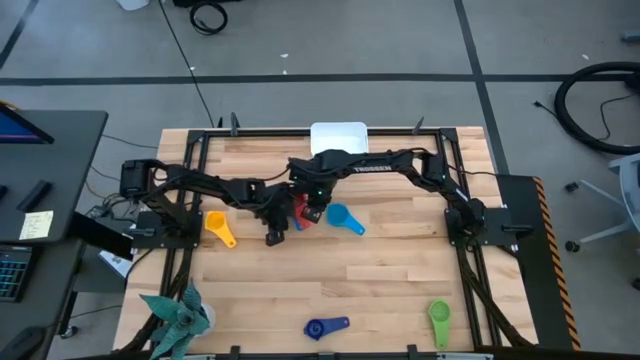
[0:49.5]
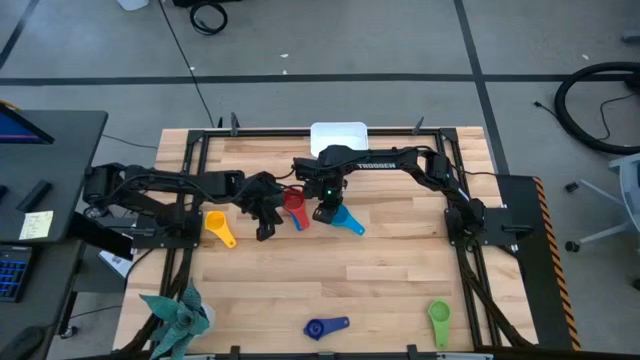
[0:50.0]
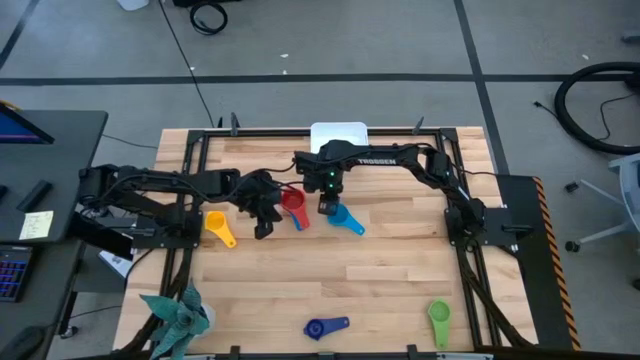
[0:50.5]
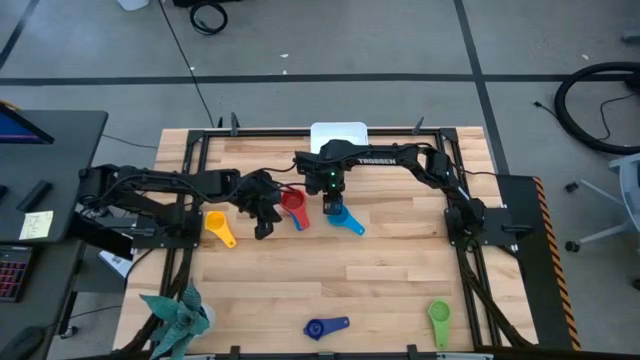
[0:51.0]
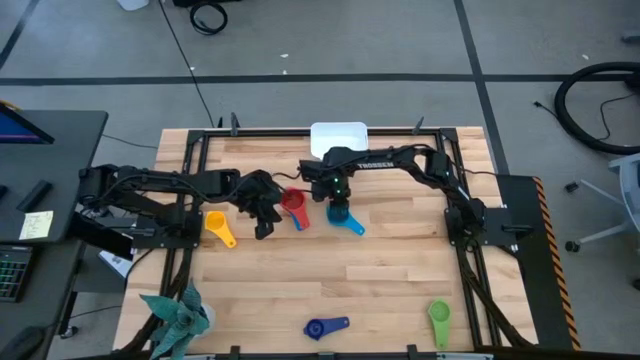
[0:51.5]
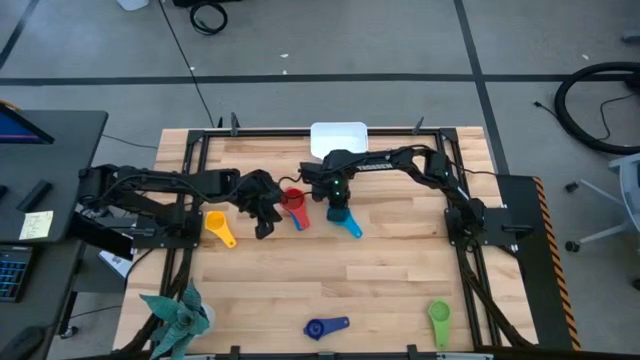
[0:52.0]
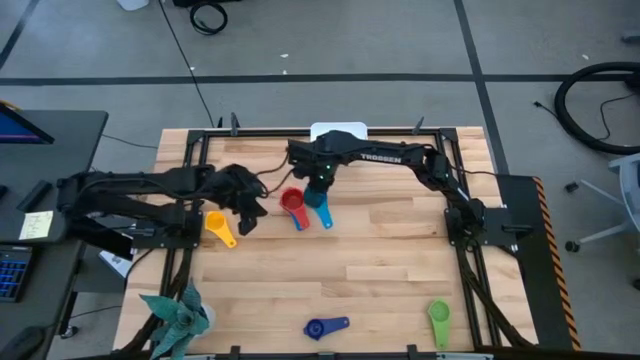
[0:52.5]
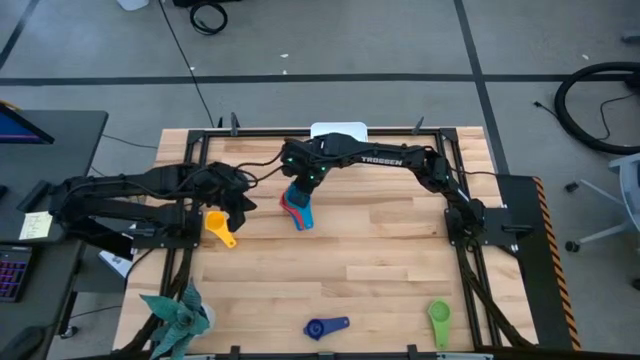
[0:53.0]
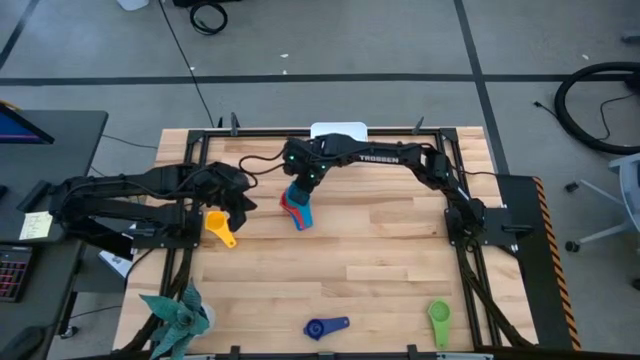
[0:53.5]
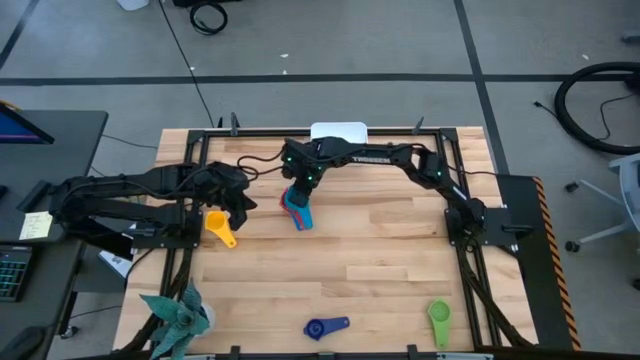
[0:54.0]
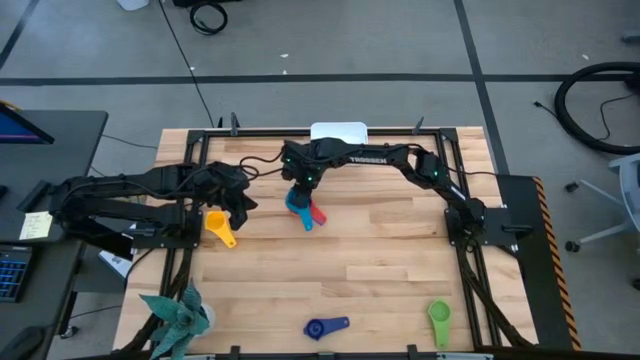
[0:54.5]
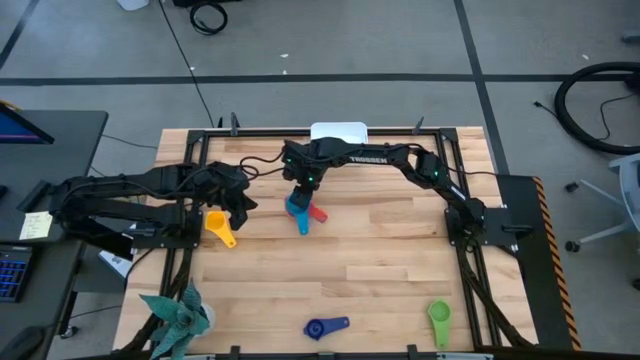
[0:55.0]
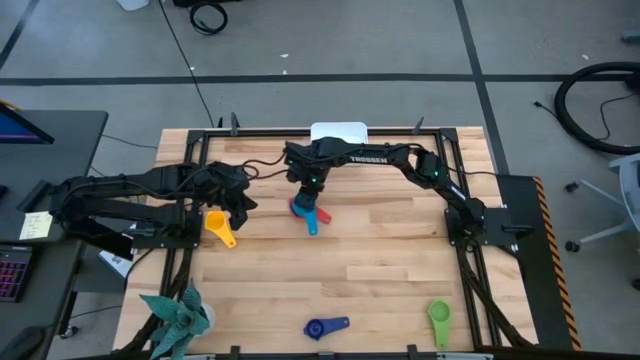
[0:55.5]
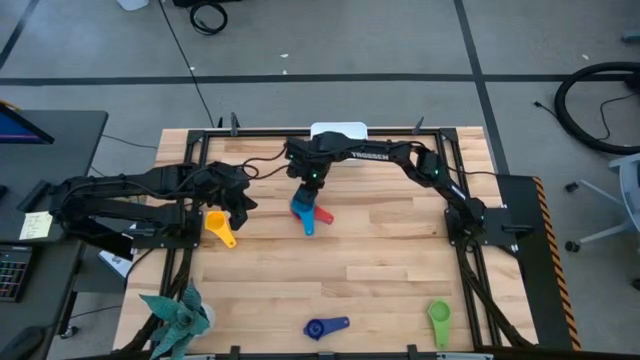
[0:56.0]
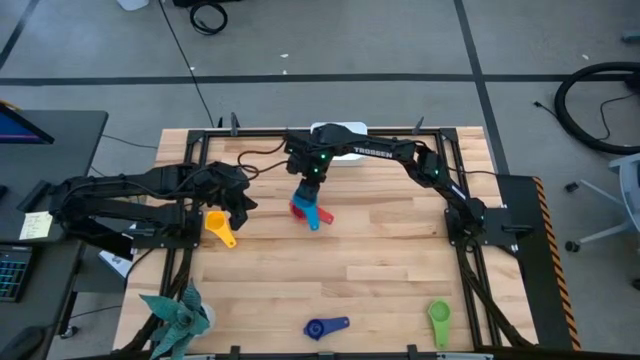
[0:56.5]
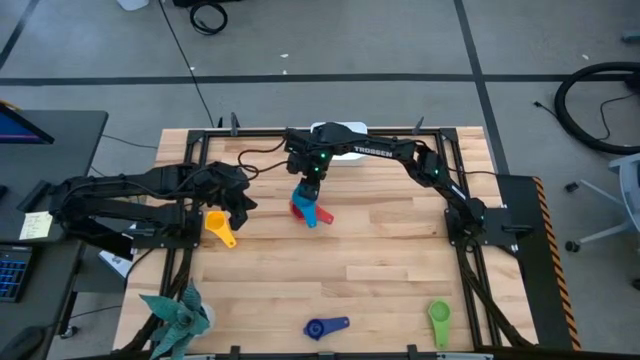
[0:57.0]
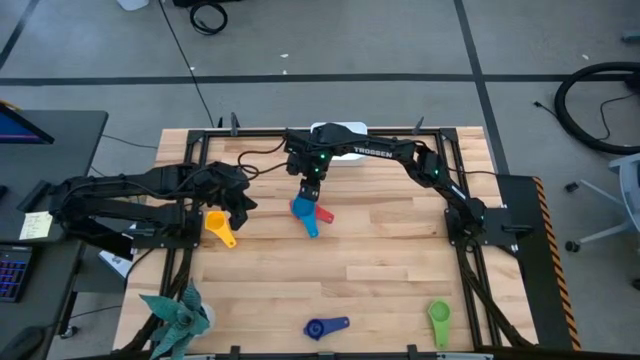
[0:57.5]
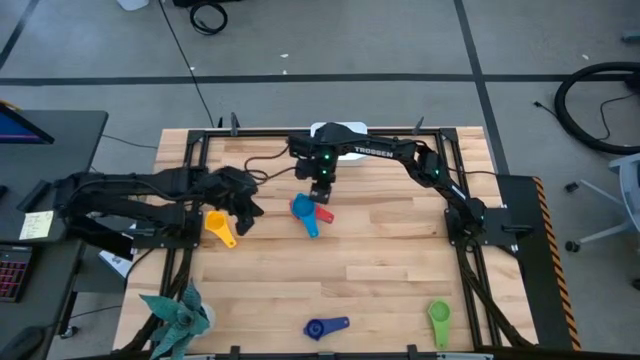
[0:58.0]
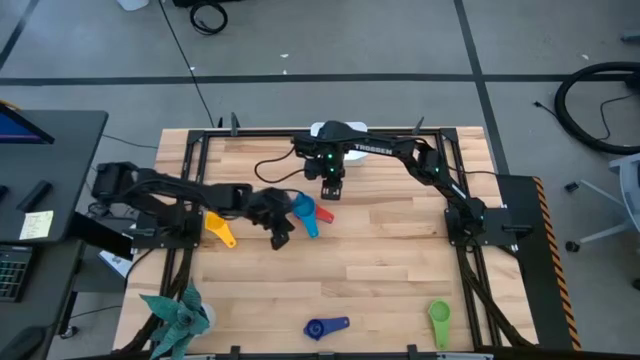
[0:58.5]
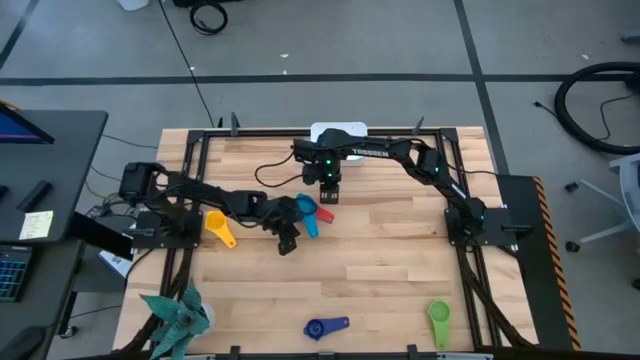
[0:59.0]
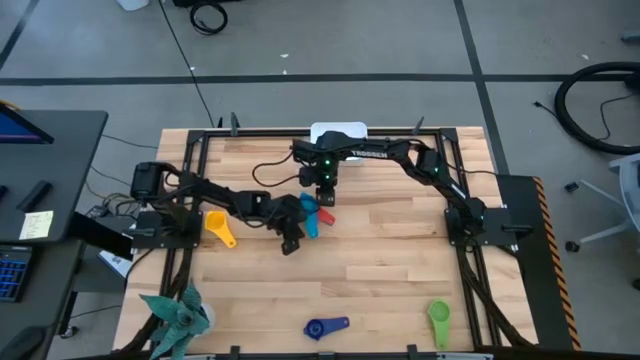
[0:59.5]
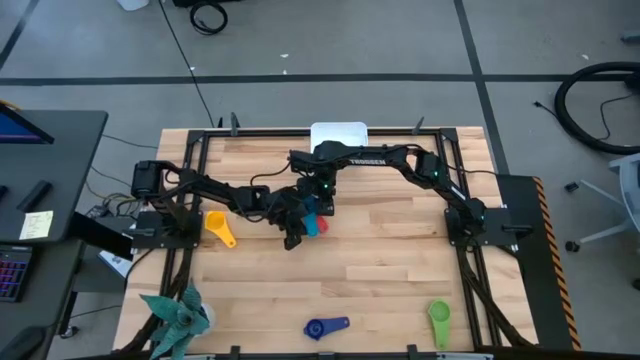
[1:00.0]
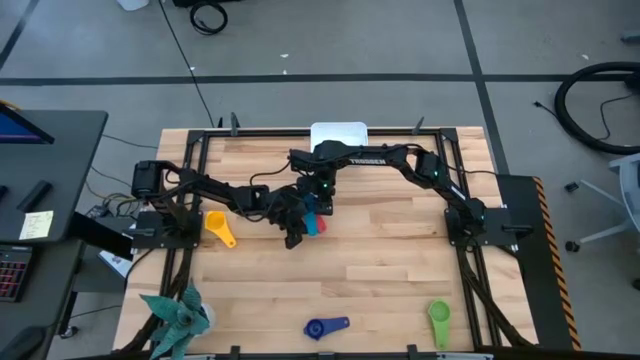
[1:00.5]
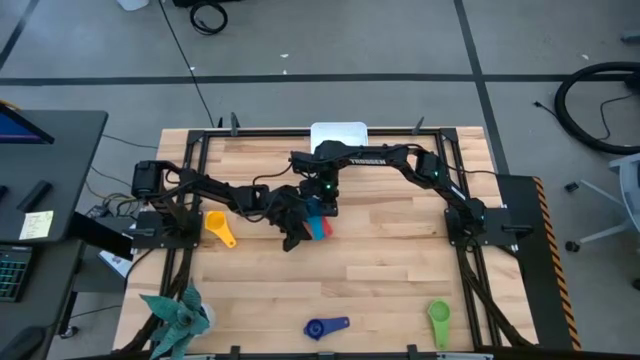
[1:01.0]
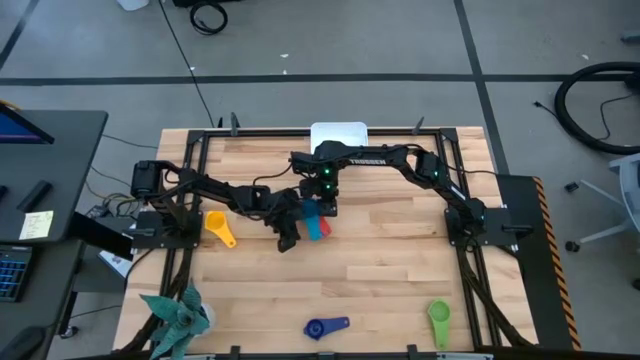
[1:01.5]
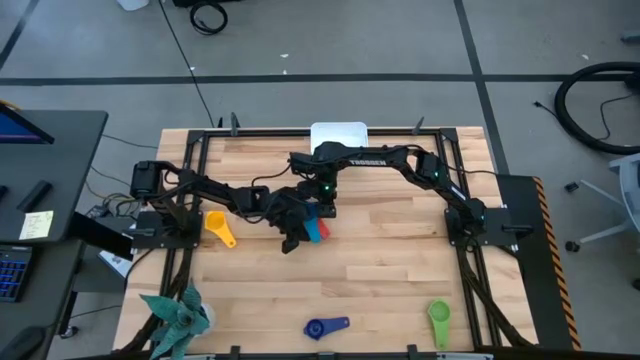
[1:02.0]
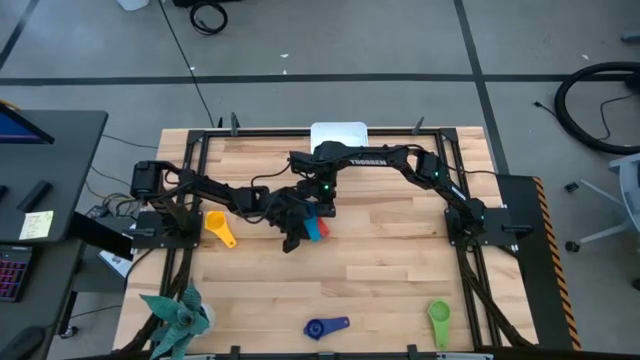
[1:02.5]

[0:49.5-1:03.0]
Task: Nest measuring cups in basket
Stack the light blue measuring cup on the red measuring cup

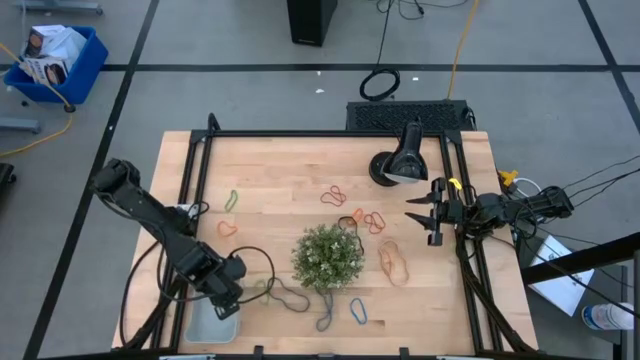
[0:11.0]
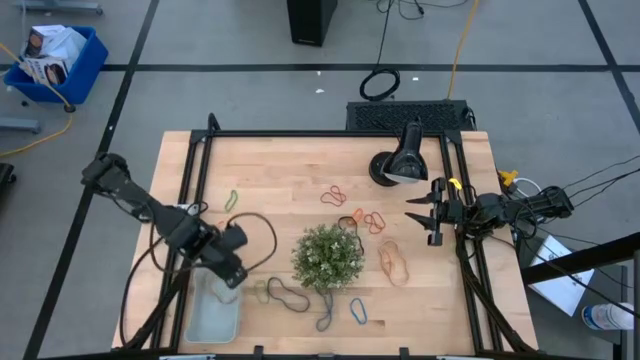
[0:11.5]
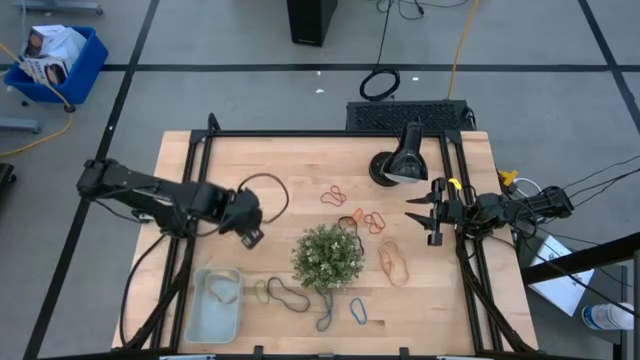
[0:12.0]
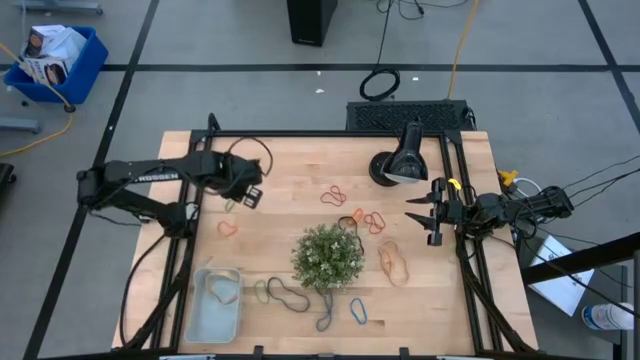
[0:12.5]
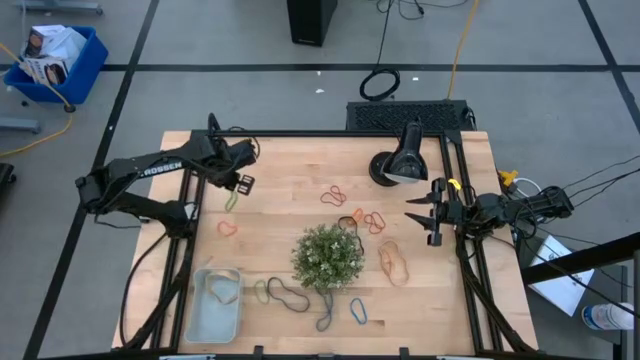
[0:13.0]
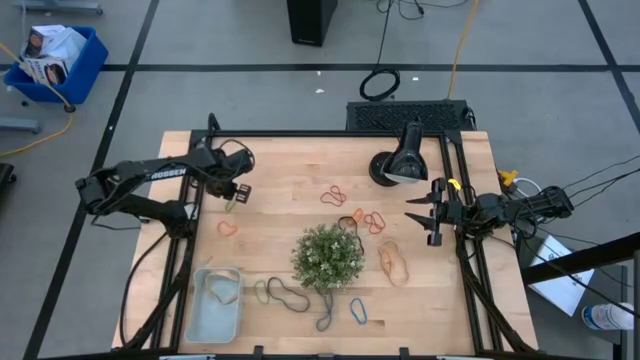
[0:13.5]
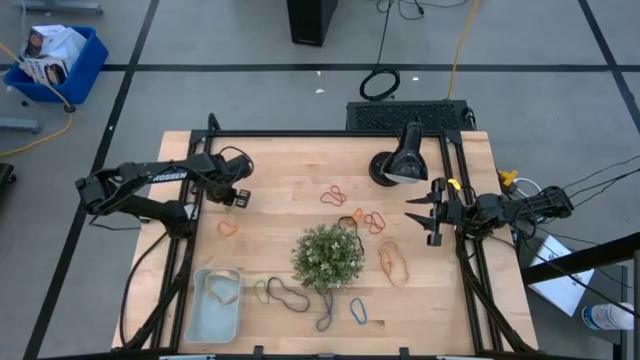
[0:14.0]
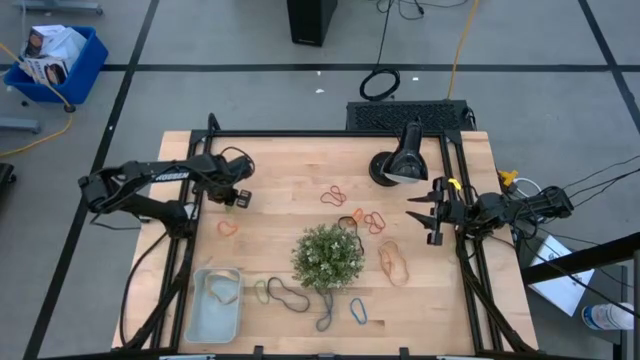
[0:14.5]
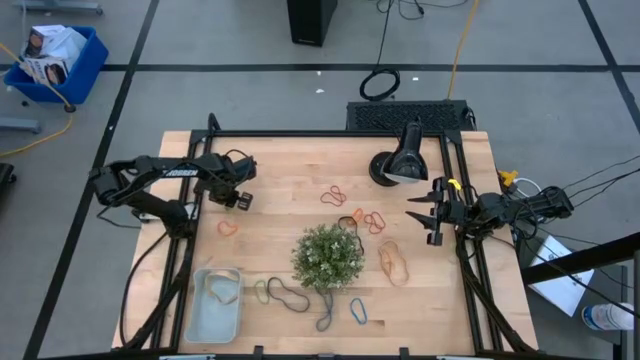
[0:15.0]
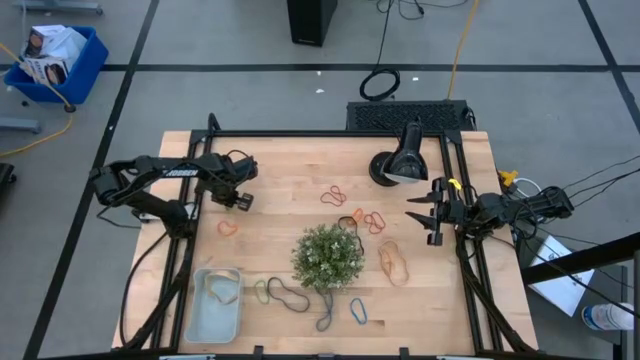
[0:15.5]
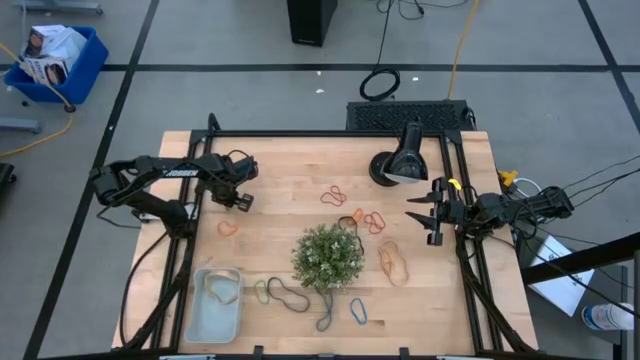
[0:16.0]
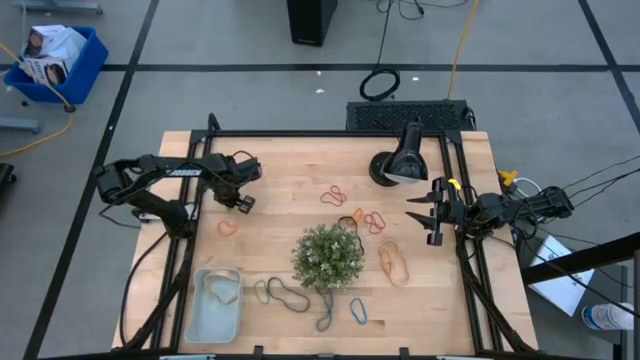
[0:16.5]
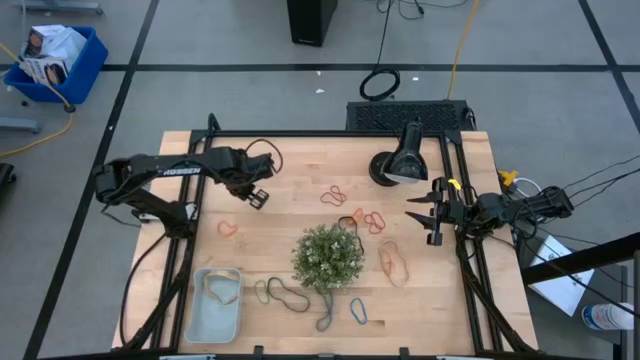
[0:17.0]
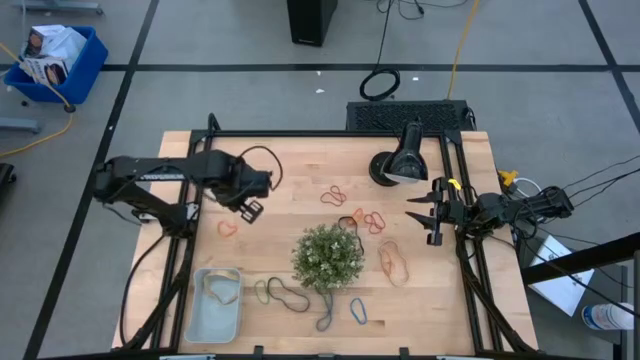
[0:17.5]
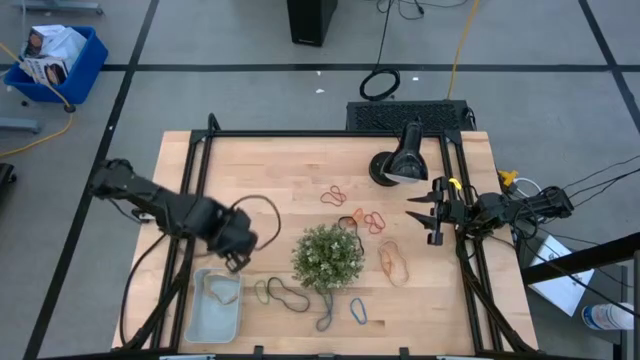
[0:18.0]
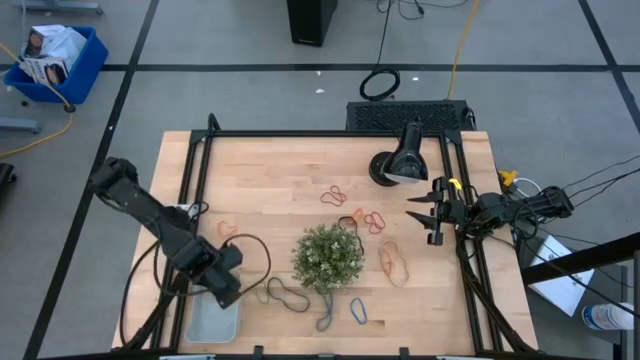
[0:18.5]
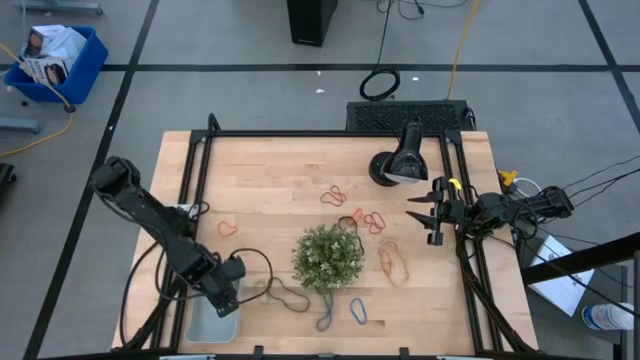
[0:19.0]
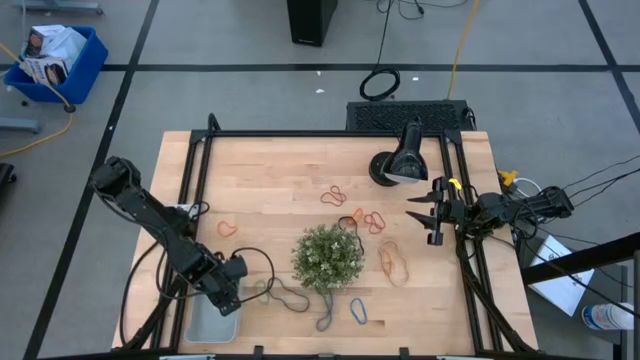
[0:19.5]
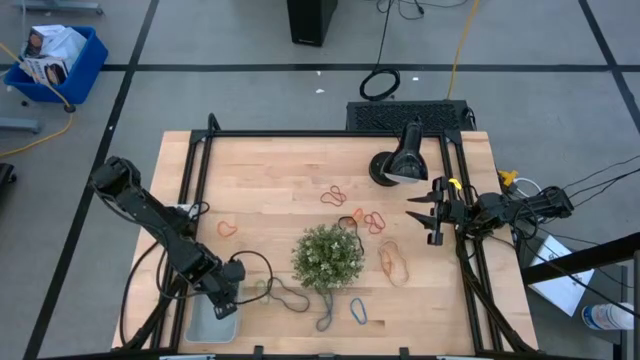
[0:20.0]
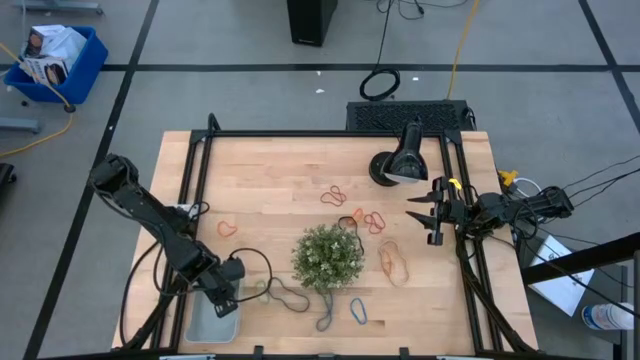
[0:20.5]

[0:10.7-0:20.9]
Task: Pick and place rubber bands into bin
Put the top green rubber band into the blue bin
